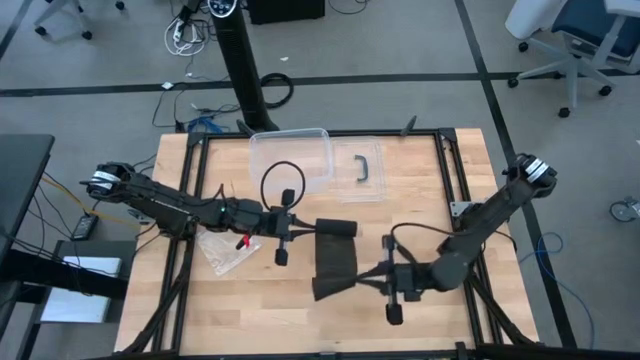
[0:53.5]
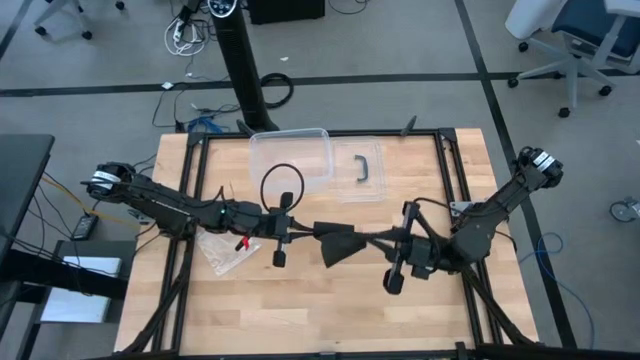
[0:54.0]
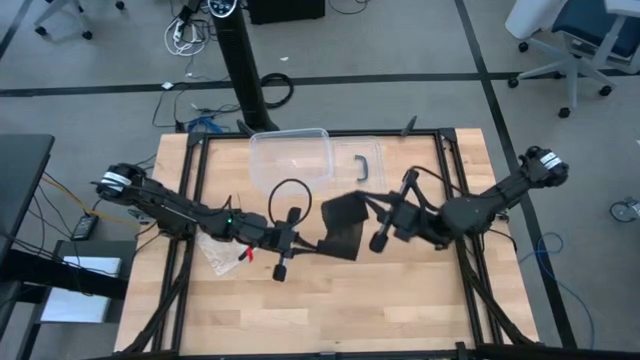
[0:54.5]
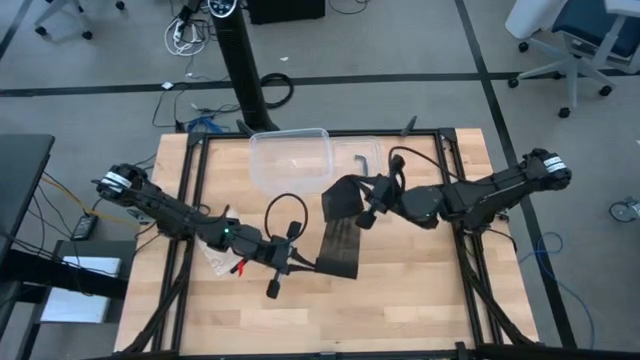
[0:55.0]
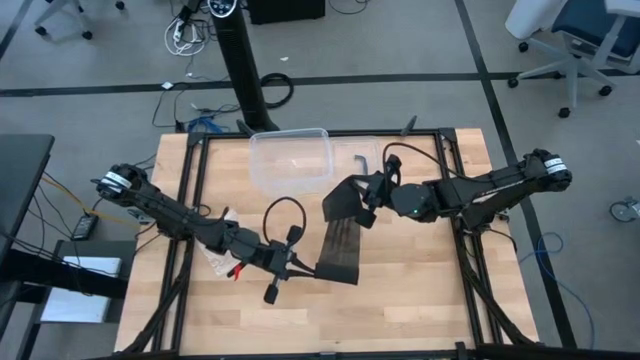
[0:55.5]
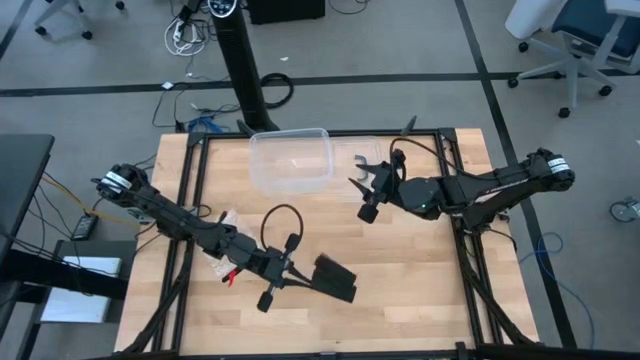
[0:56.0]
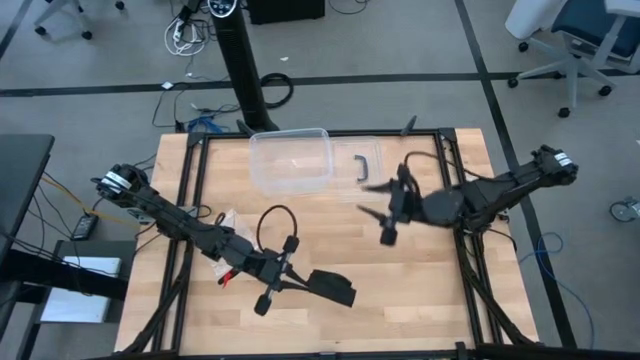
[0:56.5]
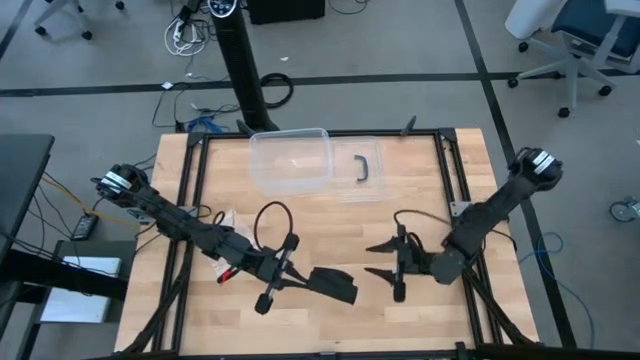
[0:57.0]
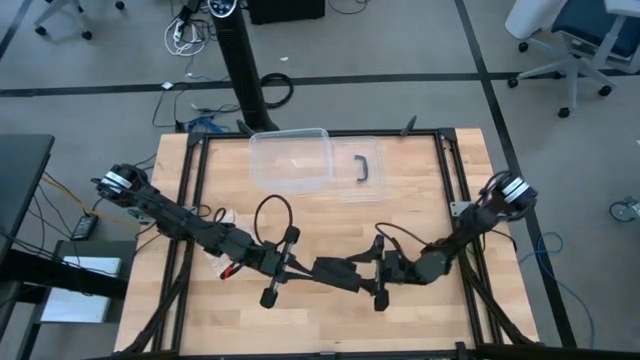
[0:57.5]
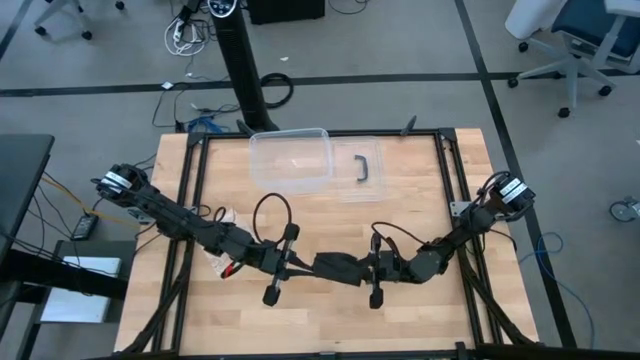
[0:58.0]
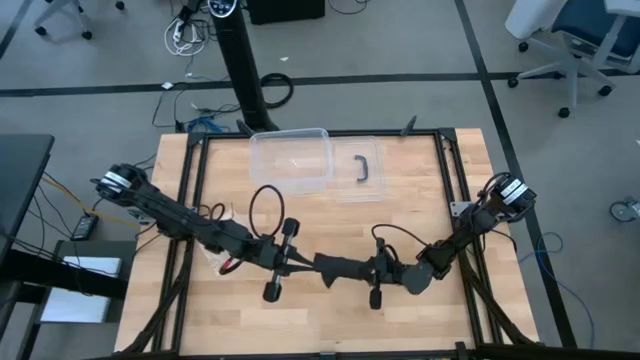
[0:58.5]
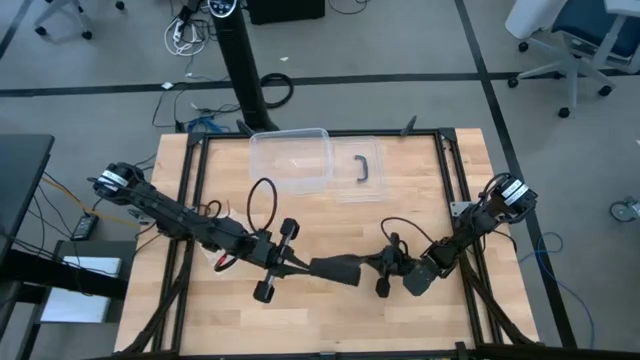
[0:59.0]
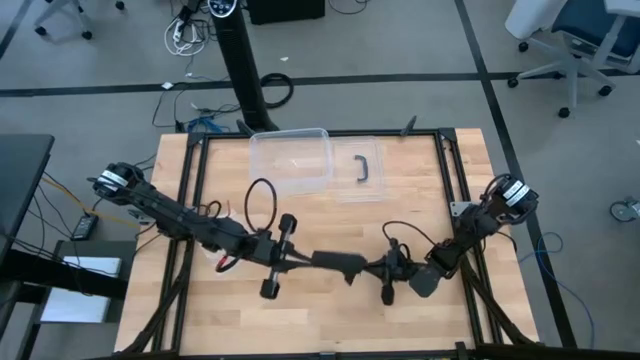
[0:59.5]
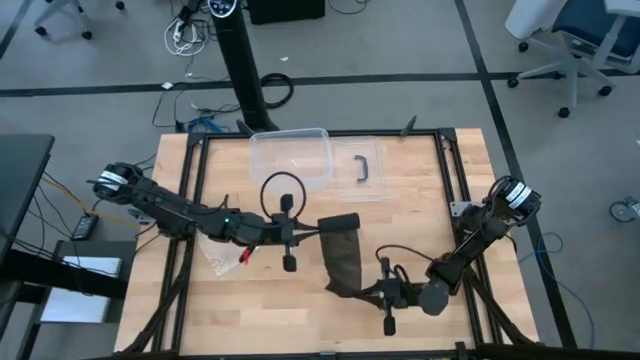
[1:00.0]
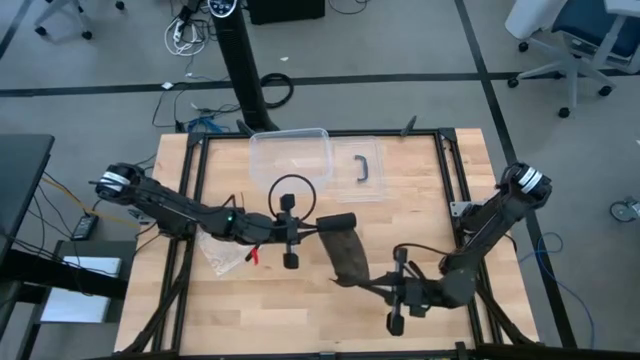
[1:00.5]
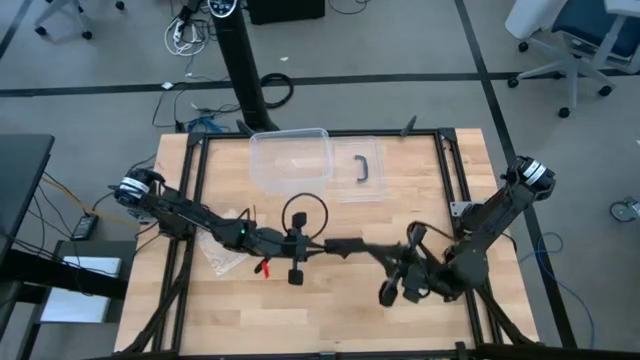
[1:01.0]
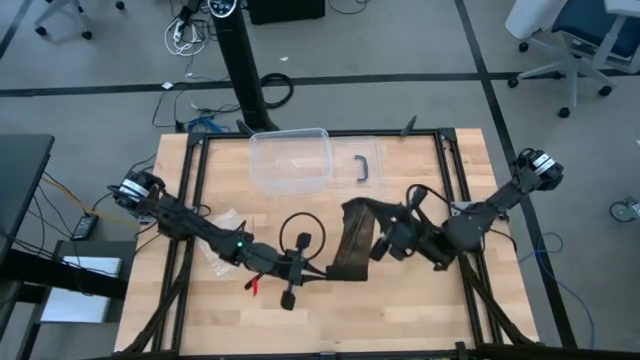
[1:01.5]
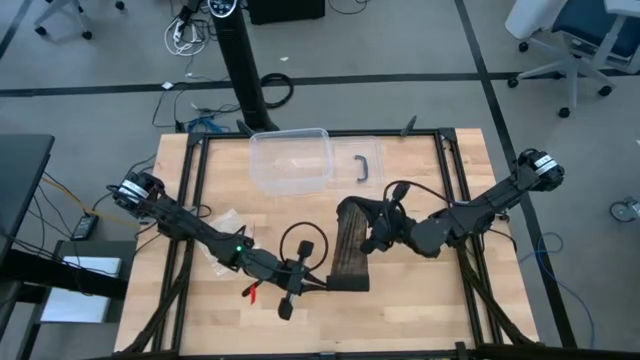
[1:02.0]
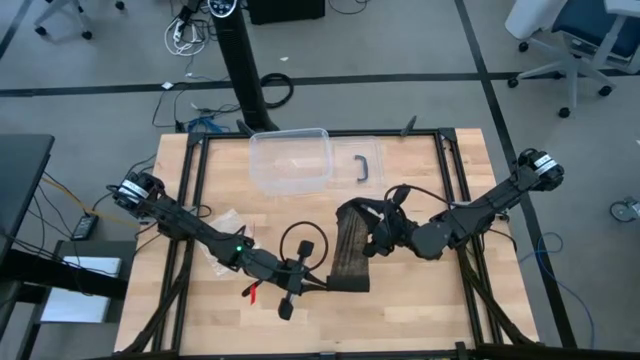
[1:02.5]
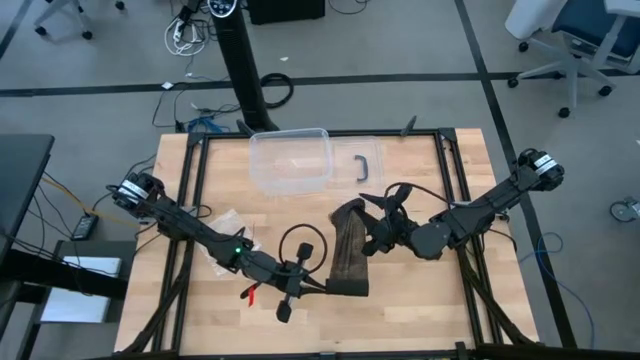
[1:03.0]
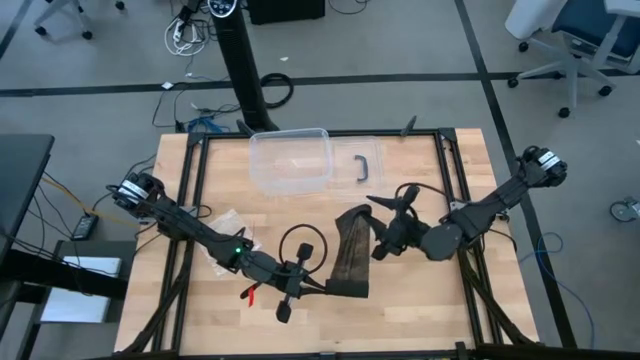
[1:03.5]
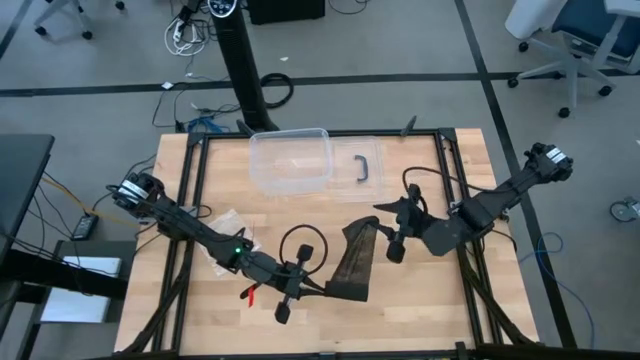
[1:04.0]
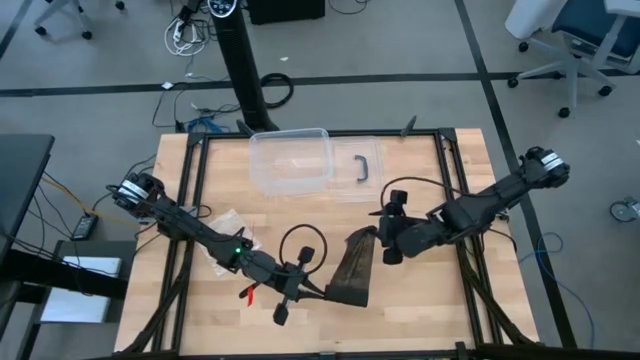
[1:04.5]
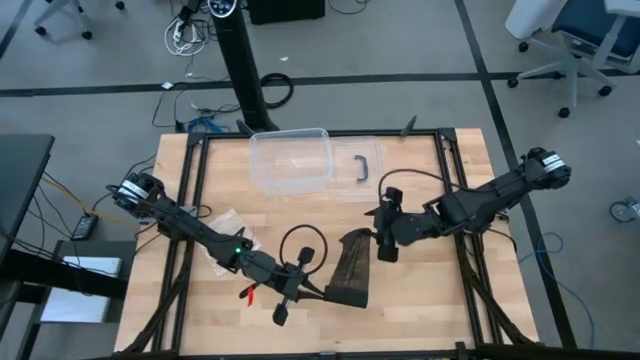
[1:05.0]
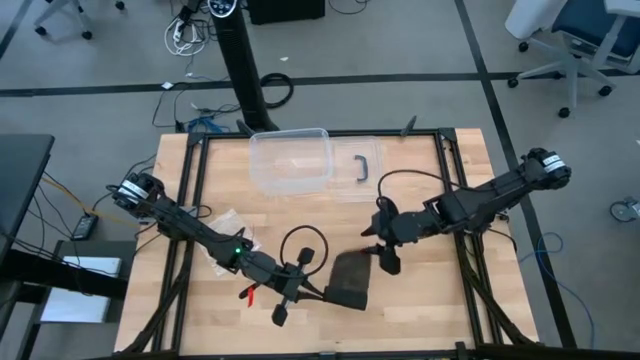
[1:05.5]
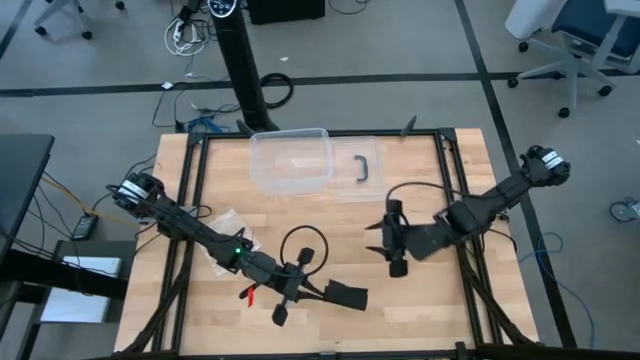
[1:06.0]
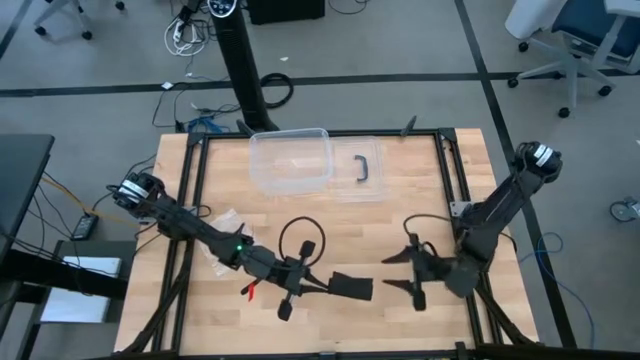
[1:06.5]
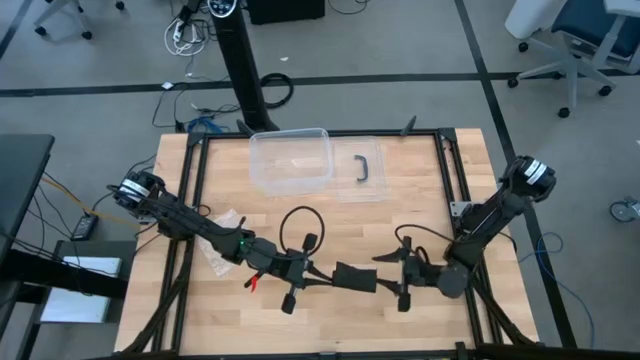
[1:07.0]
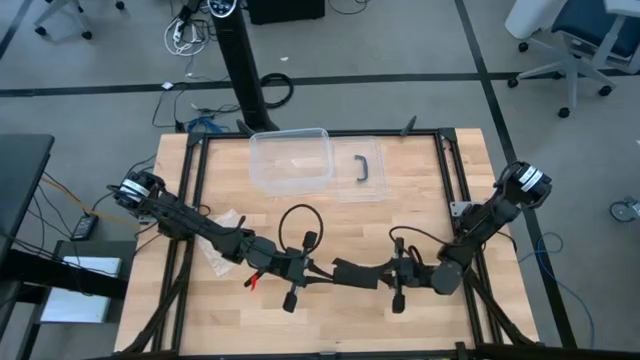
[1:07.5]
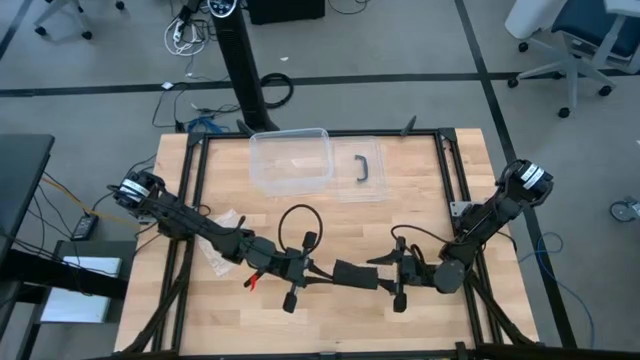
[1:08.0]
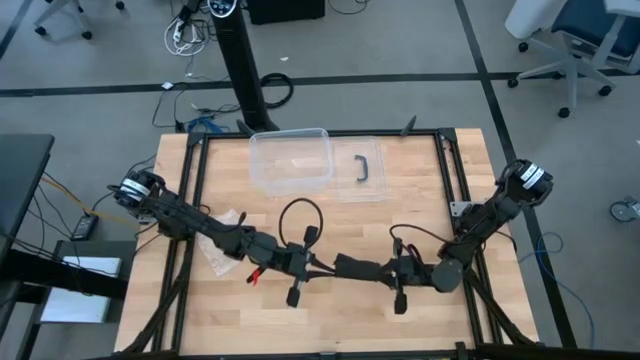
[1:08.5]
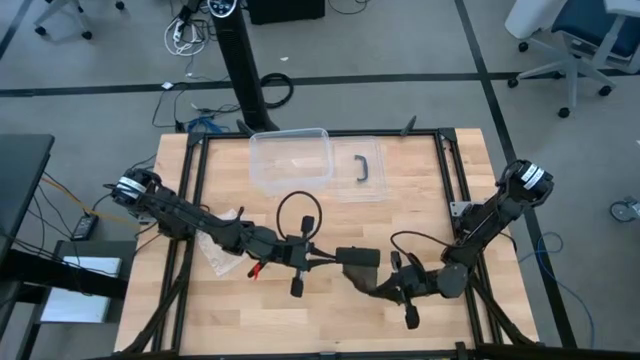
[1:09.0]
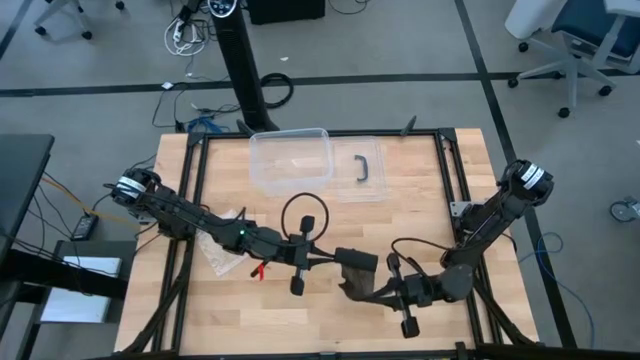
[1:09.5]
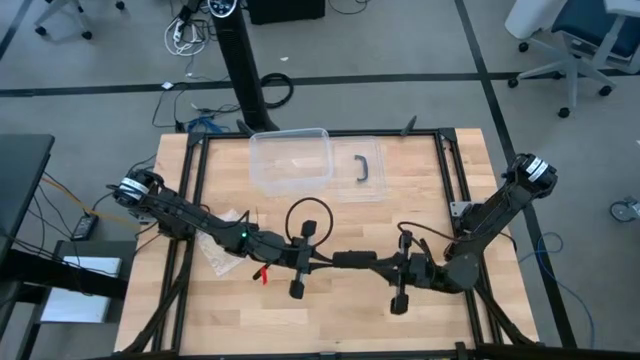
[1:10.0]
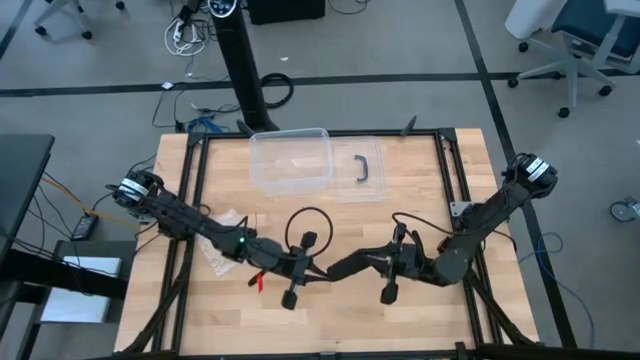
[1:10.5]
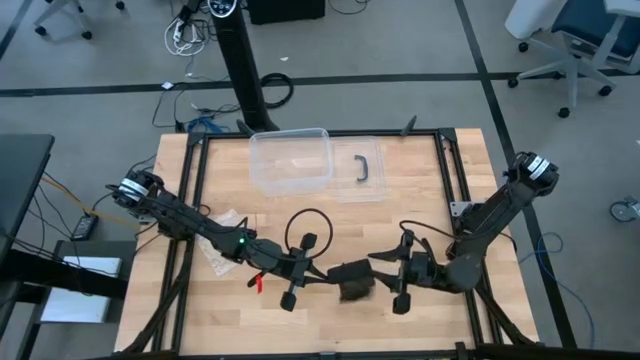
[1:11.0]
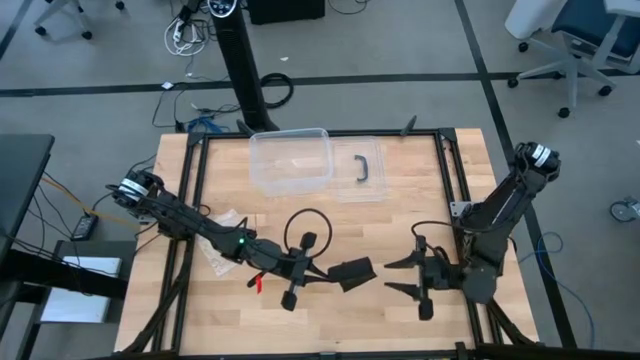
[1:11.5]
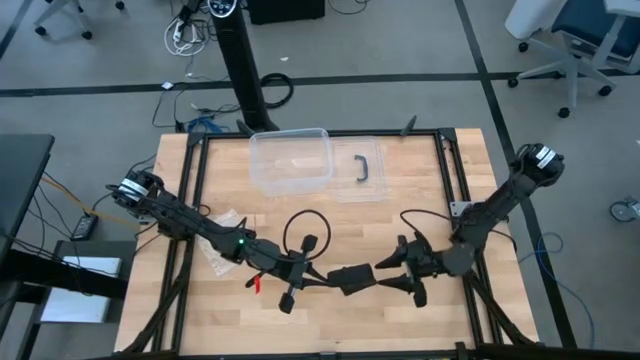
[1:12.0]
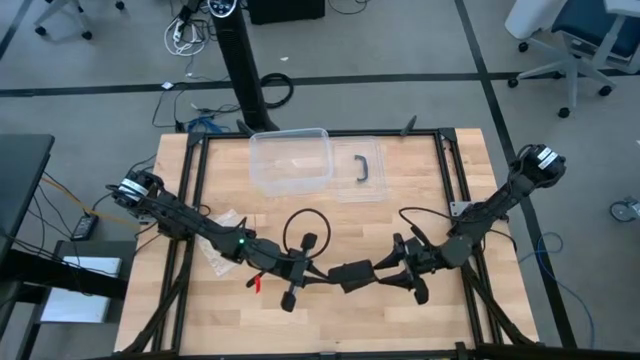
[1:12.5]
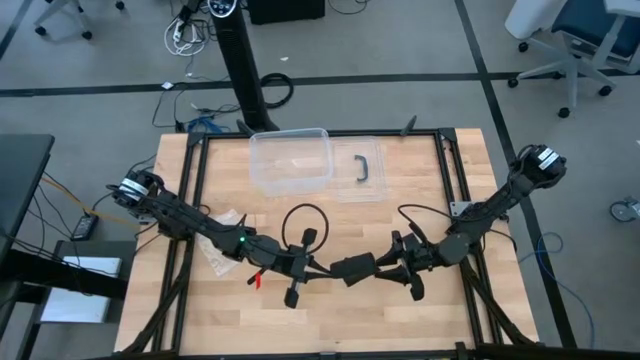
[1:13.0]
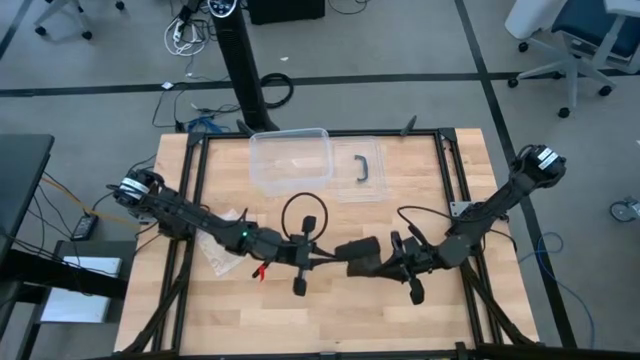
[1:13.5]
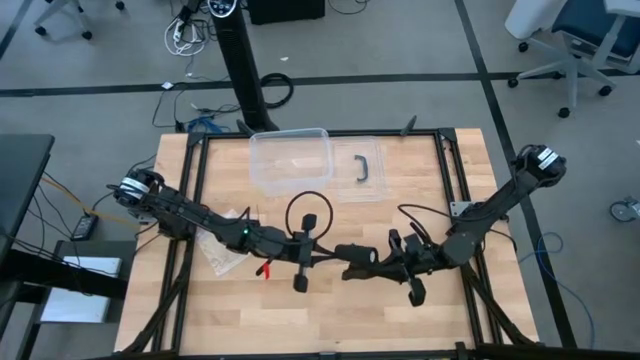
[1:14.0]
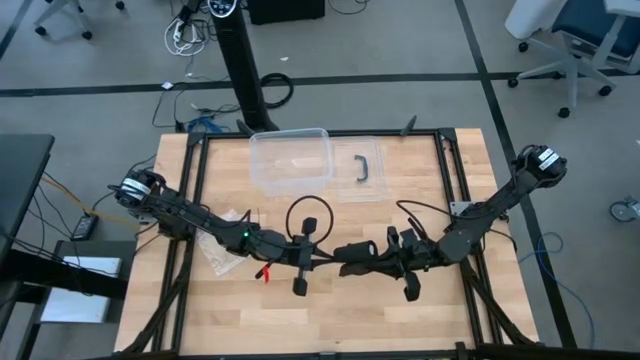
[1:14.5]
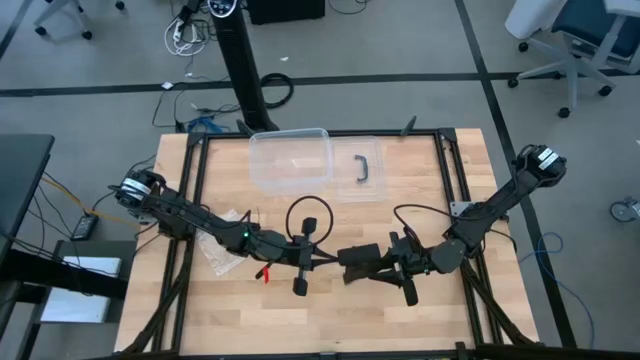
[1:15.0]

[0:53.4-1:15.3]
Task: Roll bandage
Roll the black bandage
